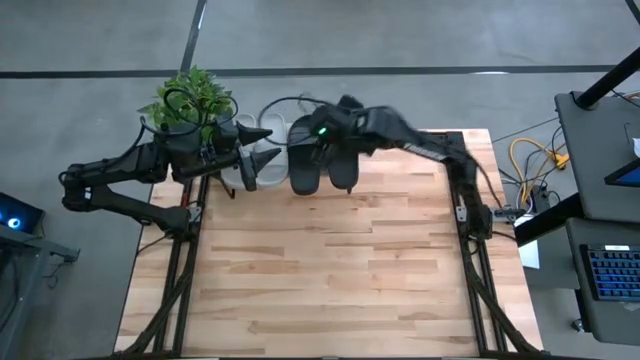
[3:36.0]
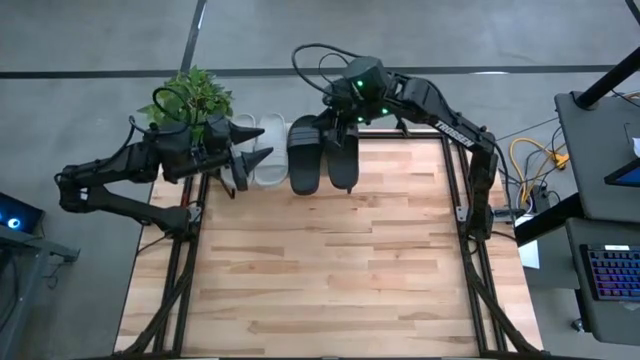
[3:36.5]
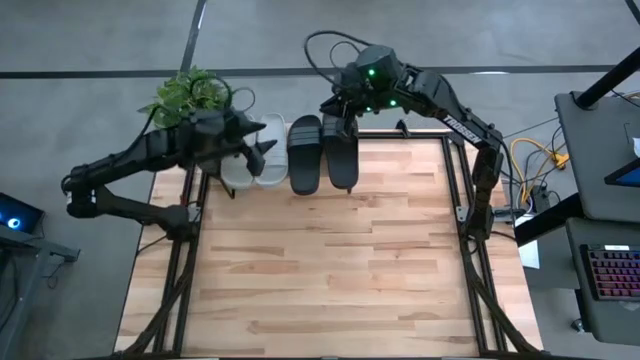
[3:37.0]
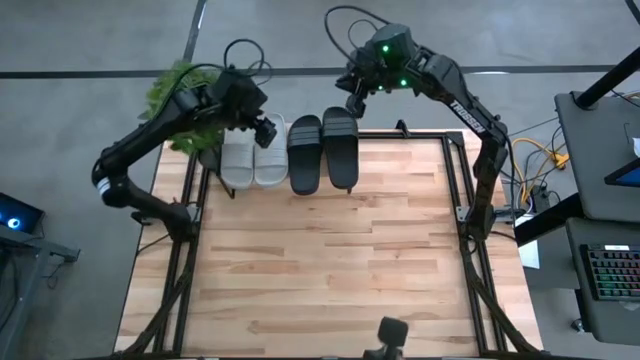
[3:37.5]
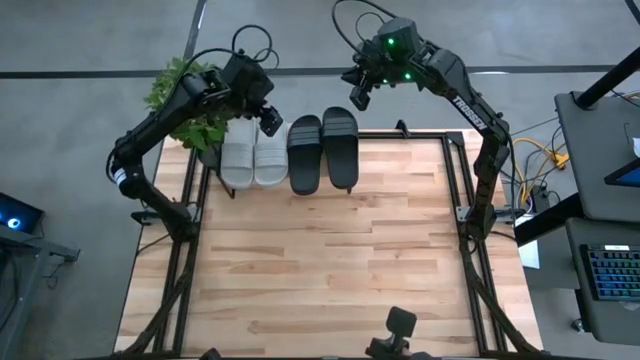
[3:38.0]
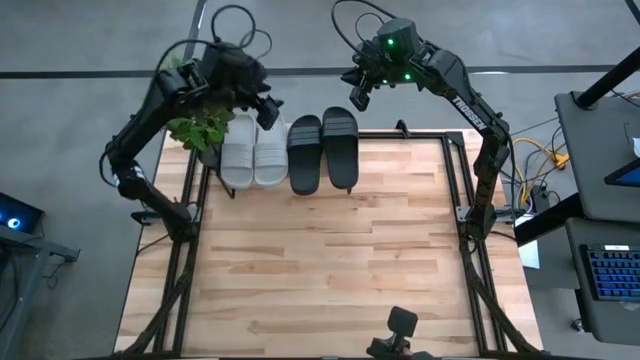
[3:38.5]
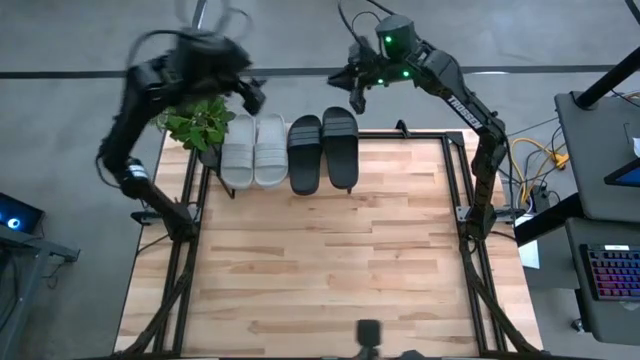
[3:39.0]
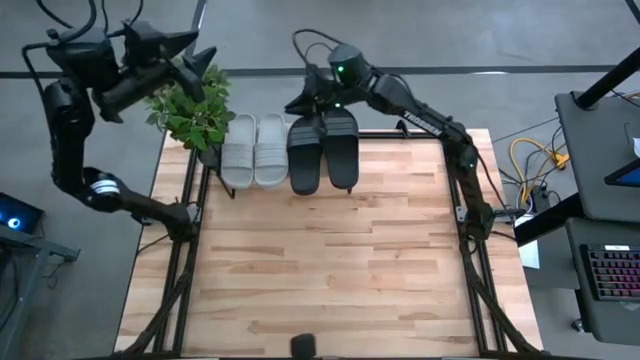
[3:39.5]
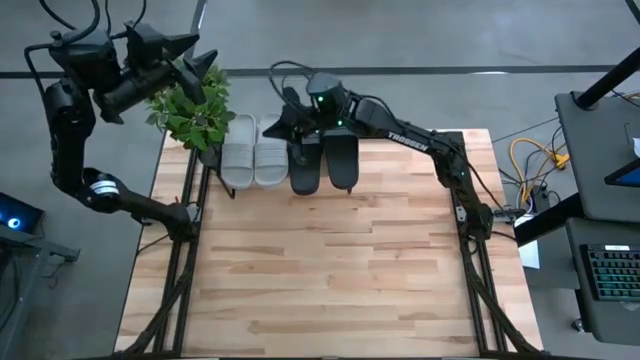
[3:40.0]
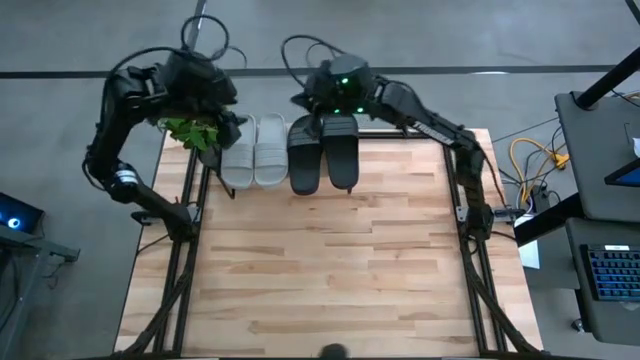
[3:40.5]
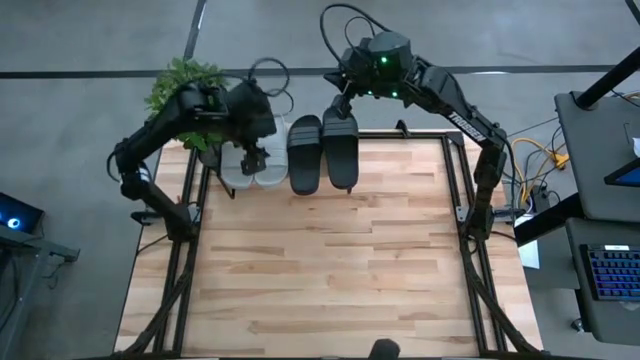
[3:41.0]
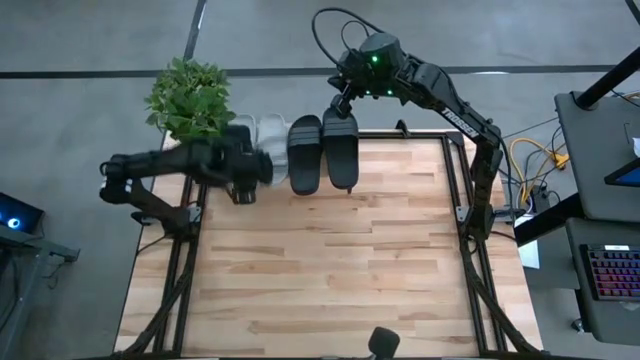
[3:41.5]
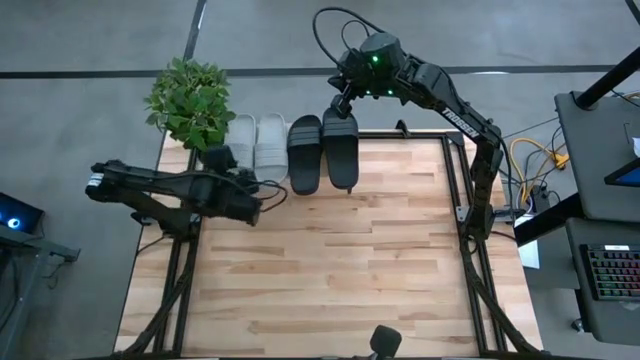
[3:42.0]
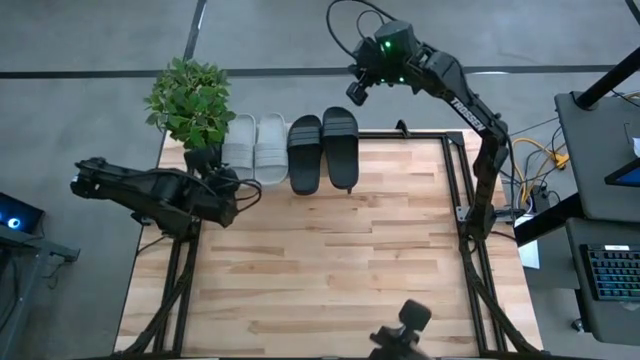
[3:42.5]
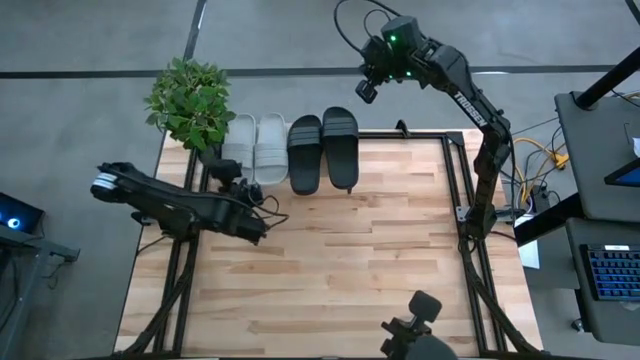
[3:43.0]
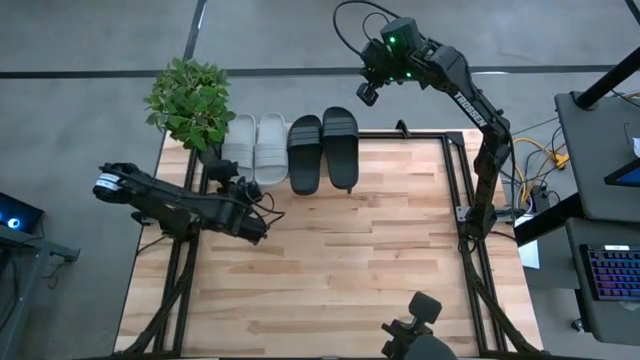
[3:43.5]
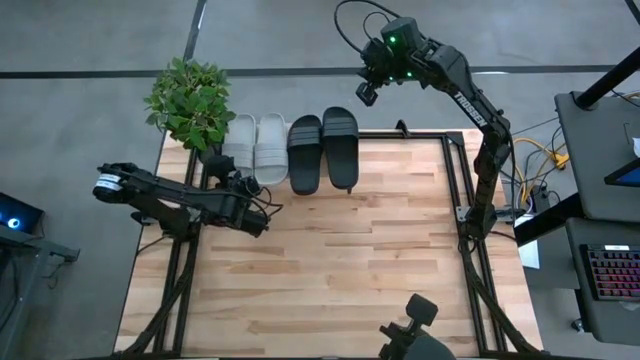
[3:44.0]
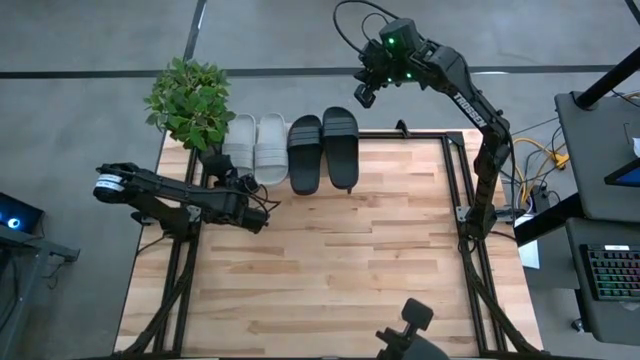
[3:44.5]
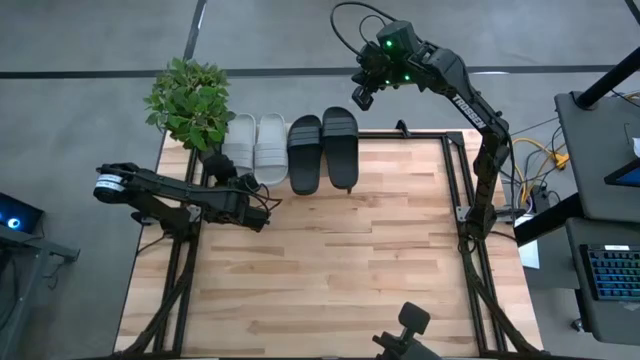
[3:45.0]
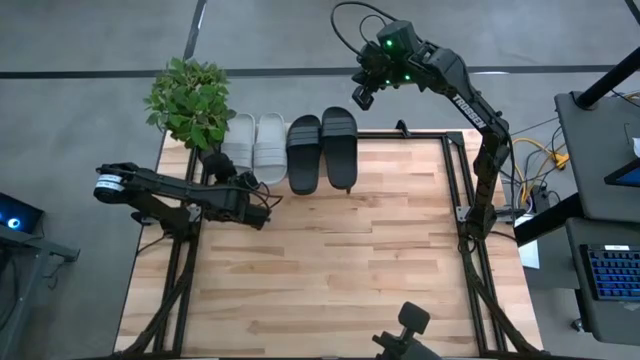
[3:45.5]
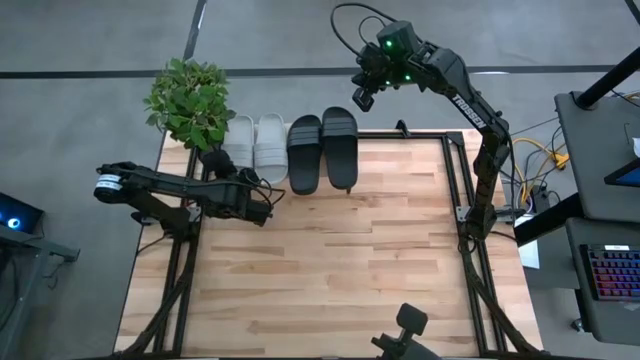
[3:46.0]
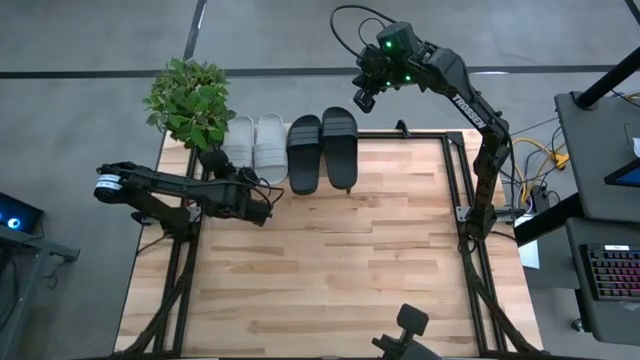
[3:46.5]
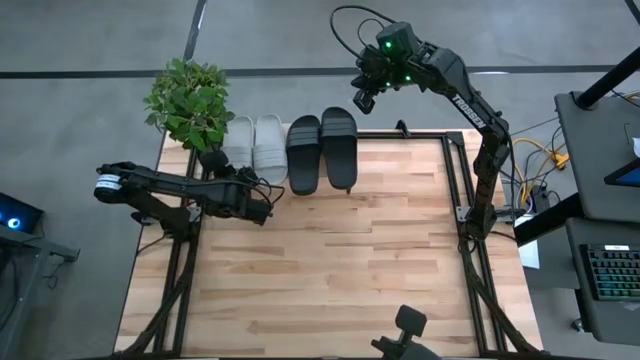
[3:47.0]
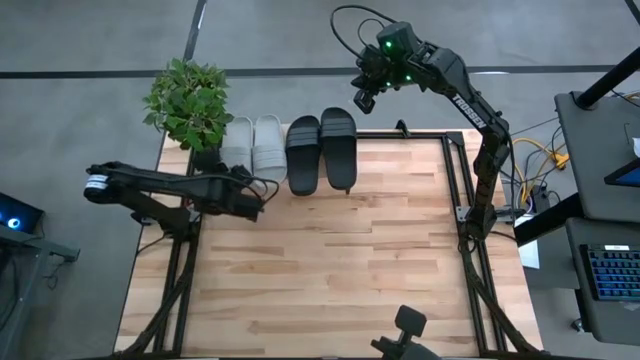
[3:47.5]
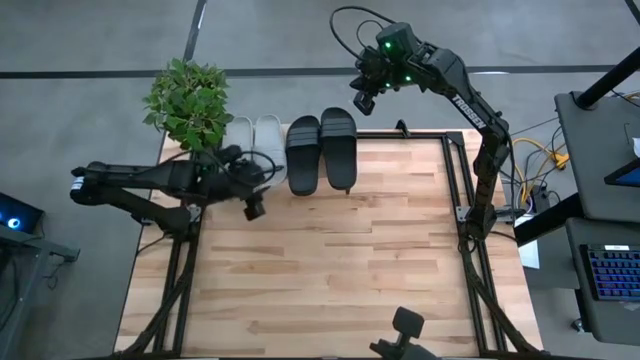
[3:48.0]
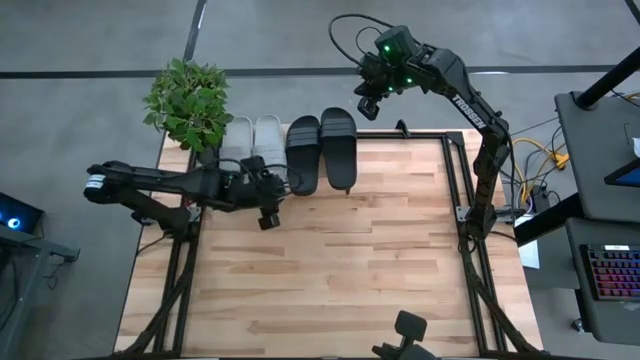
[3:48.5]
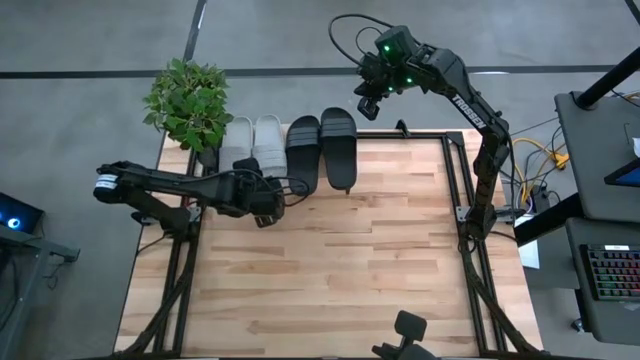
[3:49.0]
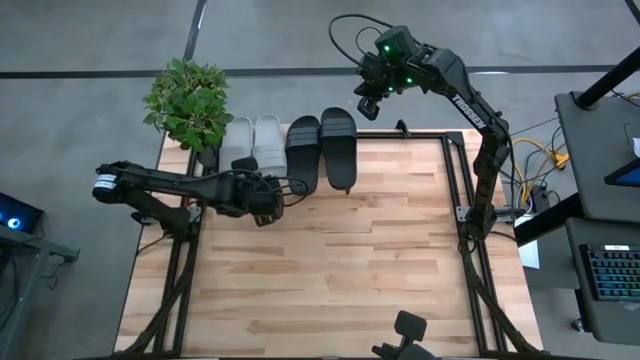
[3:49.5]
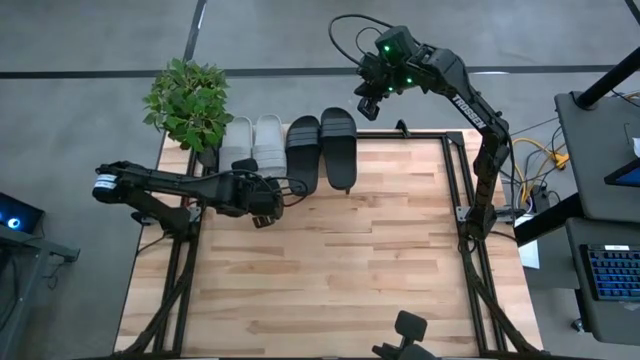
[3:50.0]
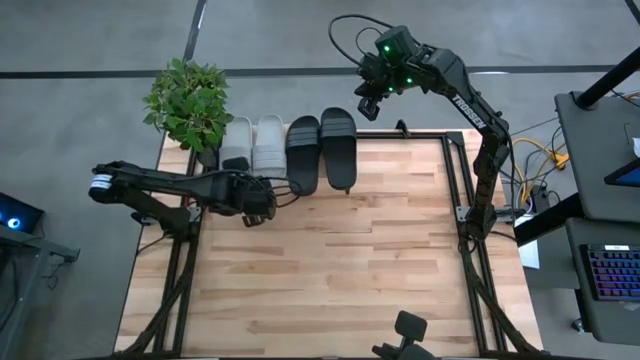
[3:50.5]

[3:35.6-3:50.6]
Task: Pick and place slides into the shelf
Adjust the pair of grey slippers on the shelf

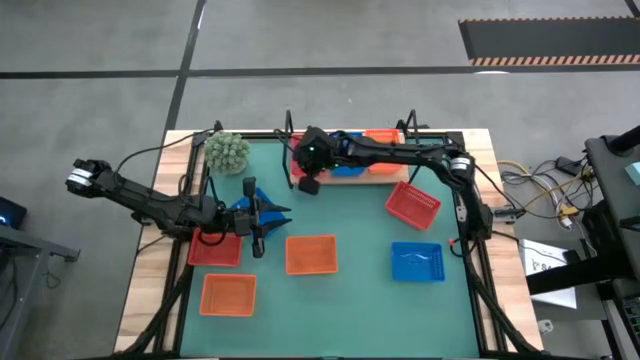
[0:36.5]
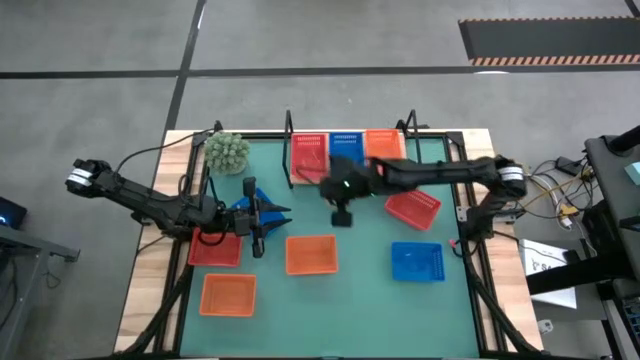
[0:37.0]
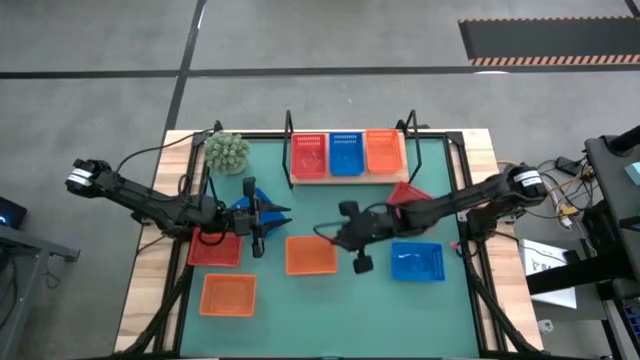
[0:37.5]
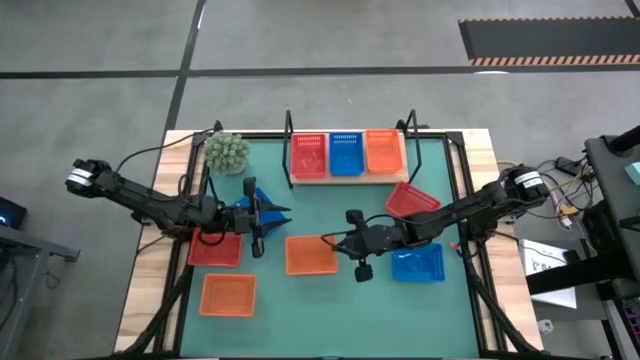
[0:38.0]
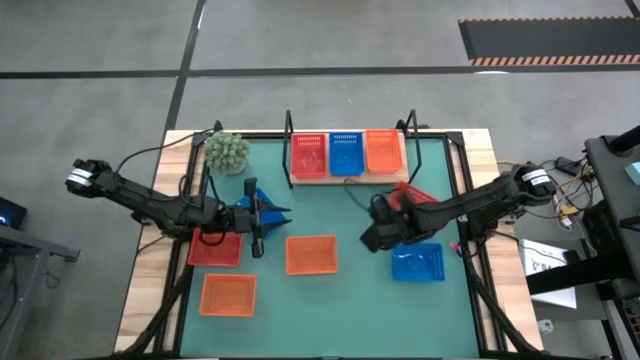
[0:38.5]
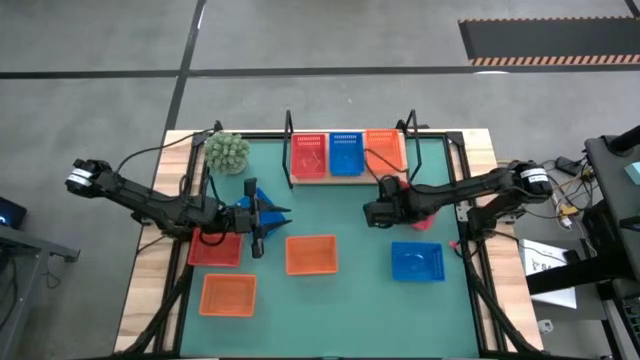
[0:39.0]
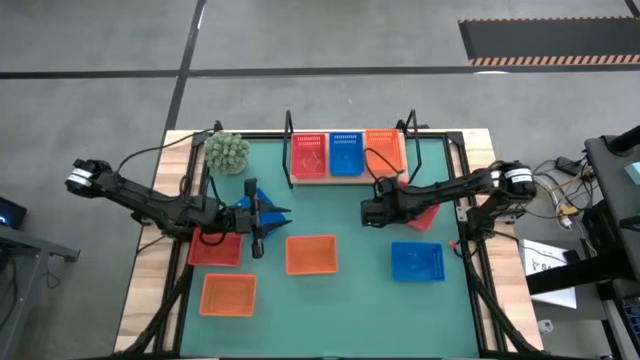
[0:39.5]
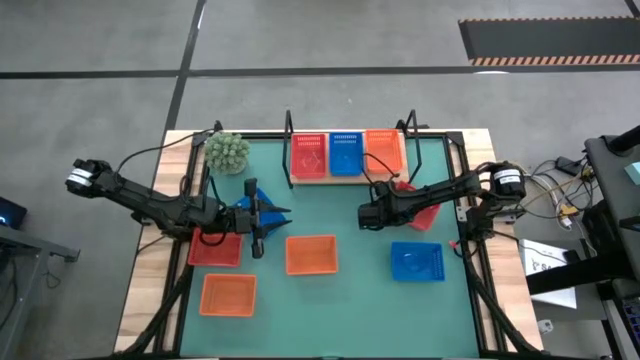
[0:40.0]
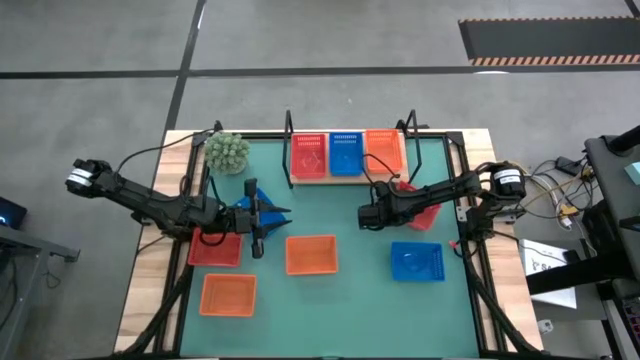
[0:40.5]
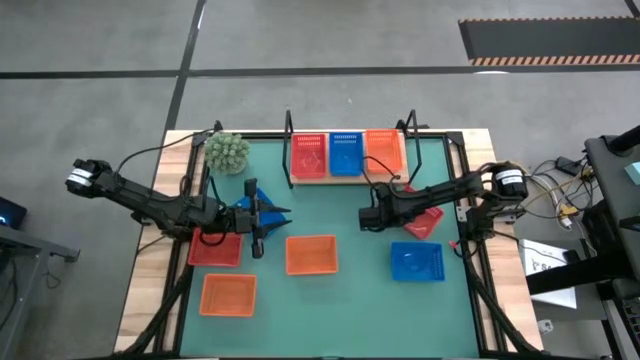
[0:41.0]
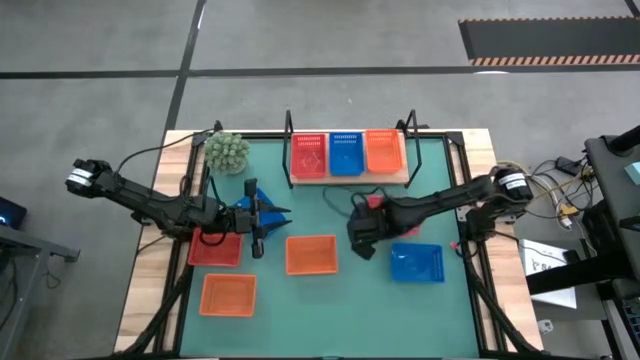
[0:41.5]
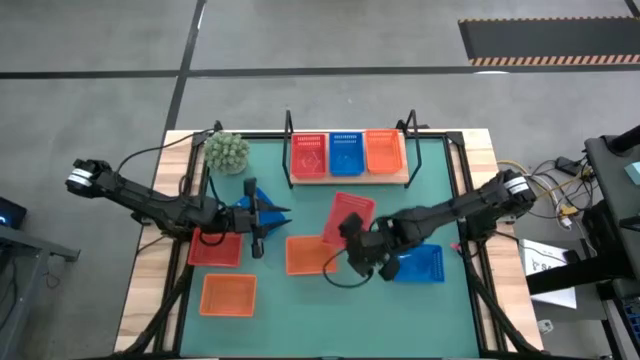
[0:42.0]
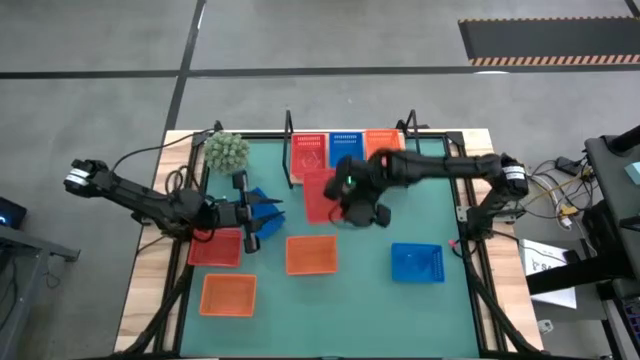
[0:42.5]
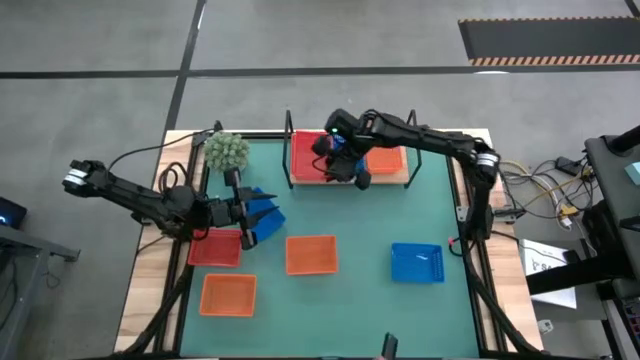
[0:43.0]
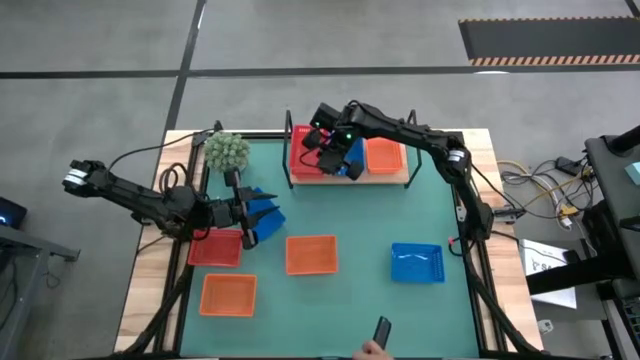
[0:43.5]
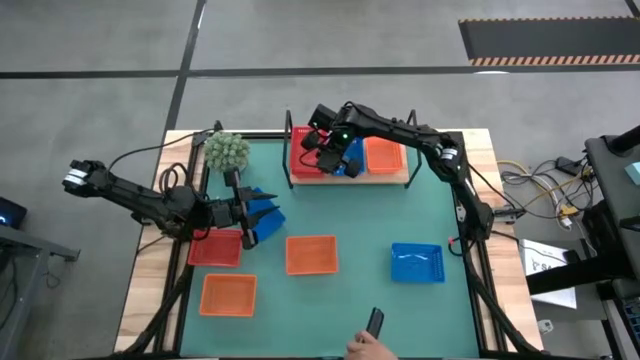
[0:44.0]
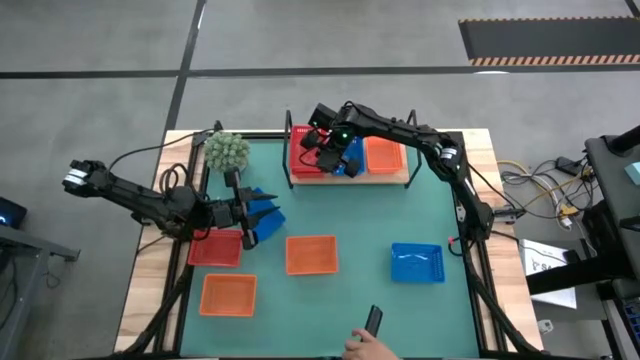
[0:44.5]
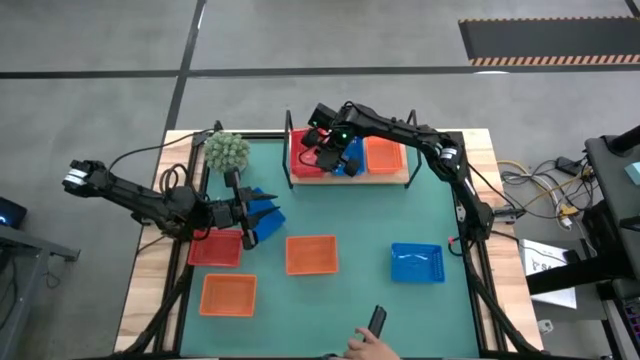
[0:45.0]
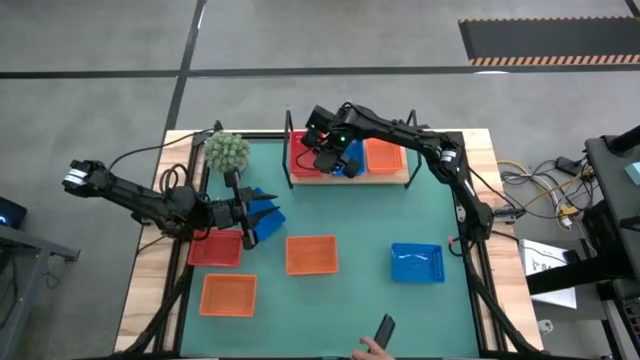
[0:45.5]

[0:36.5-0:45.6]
Task: Stack baskets on shelf by color
Stack the right red bin on top of the red bin on the shelf
